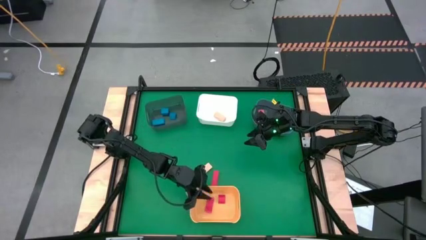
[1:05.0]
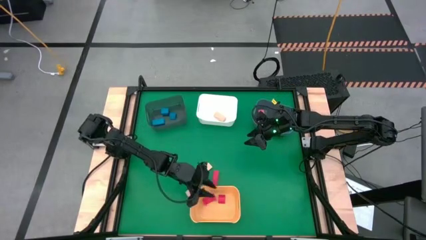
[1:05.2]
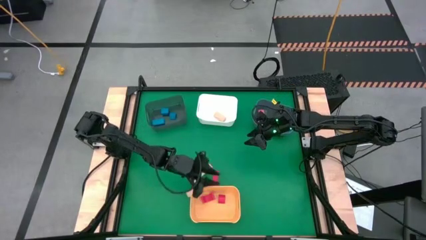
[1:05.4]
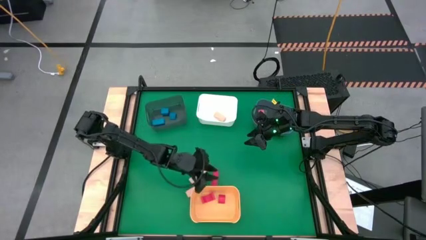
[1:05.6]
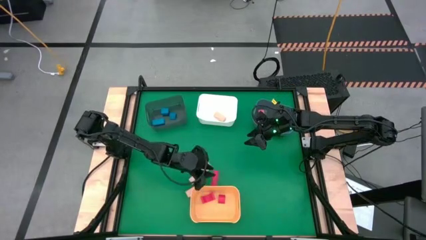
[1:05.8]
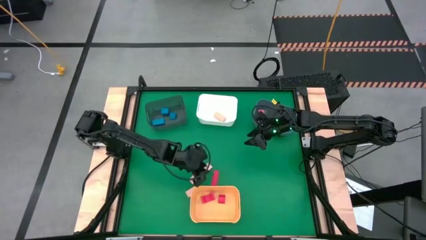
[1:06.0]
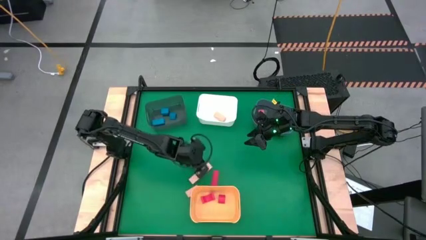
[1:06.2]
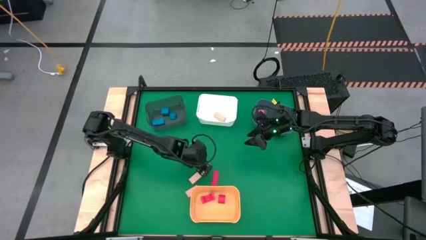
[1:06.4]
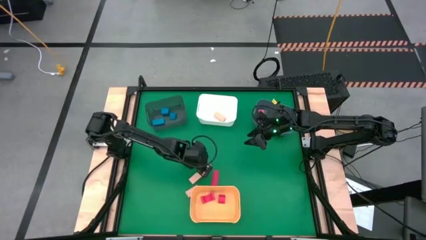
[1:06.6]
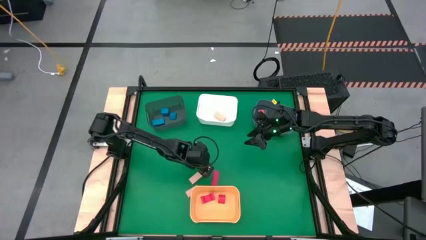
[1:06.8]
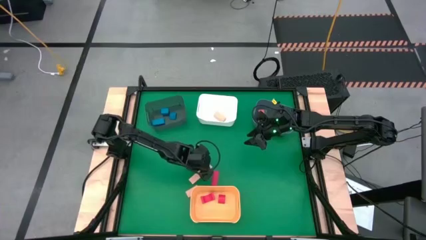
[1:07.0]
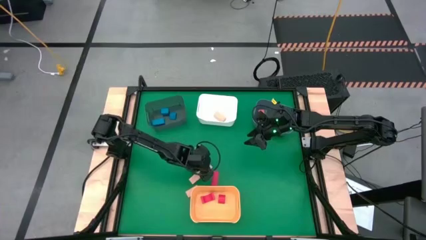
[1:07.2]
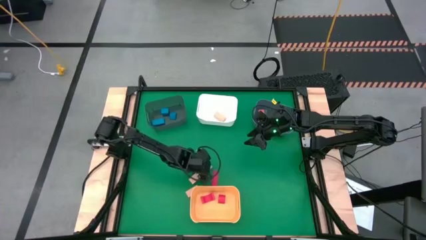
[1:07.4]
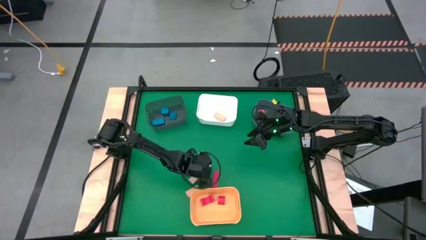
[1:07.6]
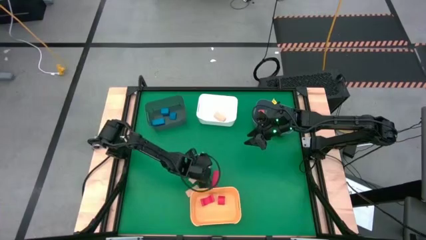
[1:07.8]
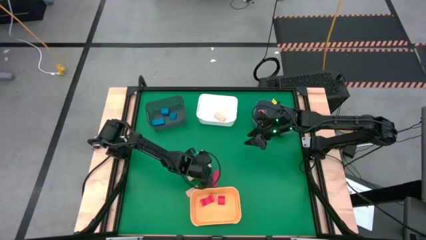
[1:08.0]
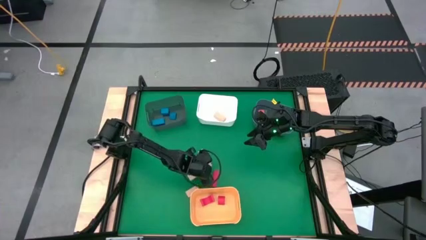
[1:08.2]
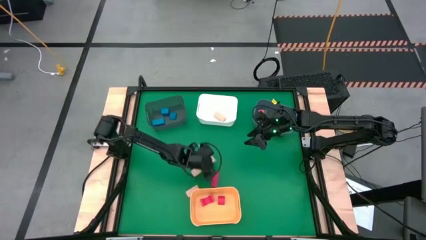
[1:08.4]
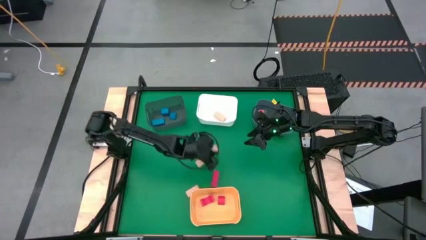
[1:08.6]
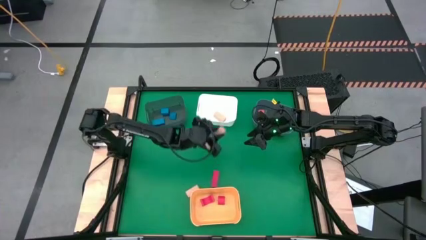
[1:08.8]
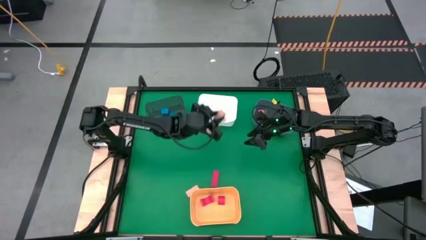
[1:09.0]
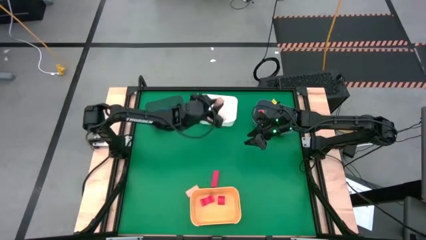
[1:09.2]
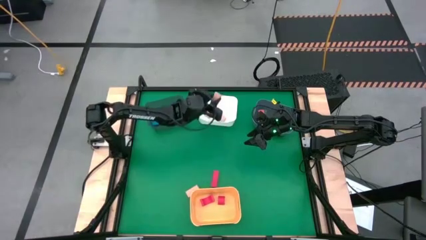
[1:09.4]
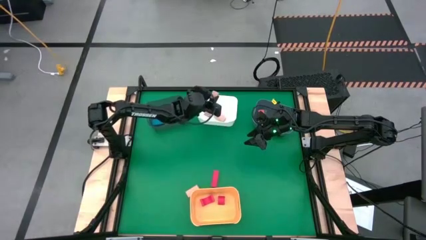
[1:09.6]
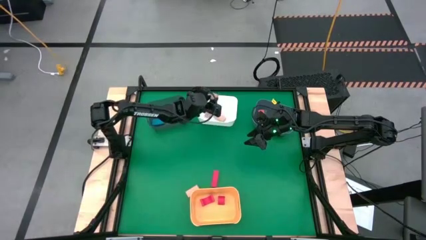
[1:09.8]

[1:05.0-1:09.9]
Task: Sort & place blocks by color
Put the wooden block into the white bin

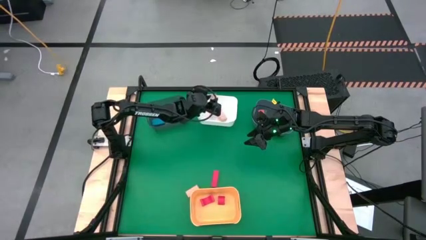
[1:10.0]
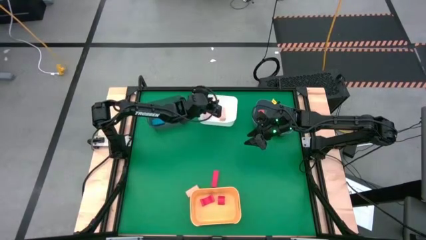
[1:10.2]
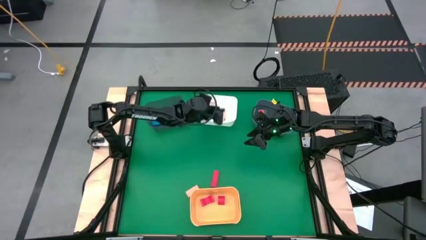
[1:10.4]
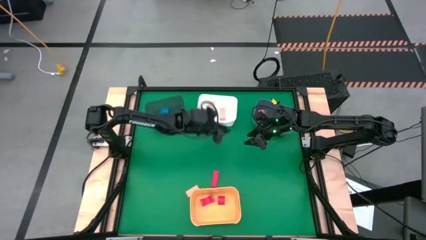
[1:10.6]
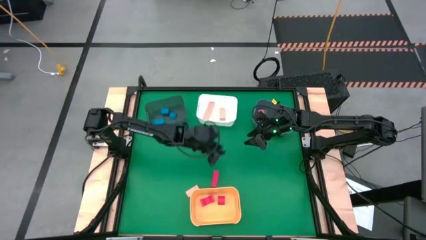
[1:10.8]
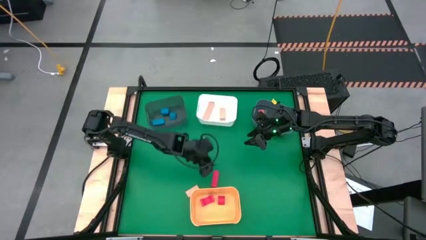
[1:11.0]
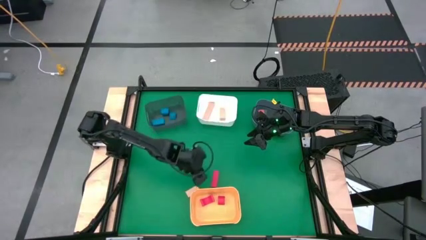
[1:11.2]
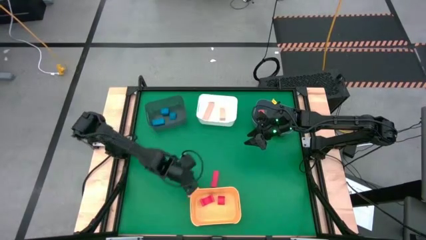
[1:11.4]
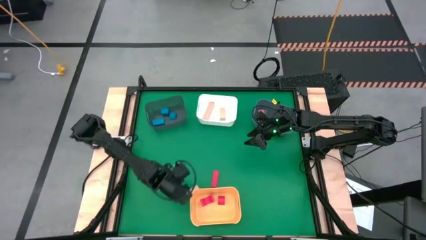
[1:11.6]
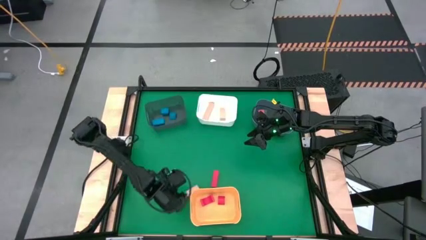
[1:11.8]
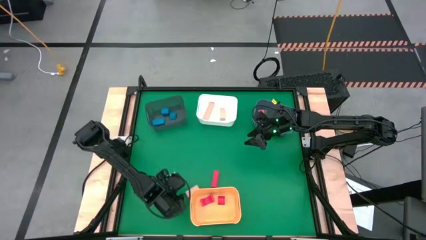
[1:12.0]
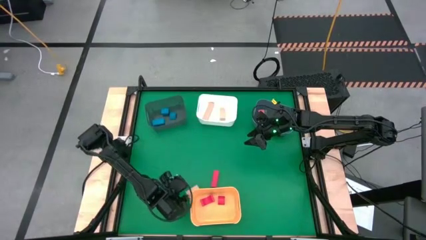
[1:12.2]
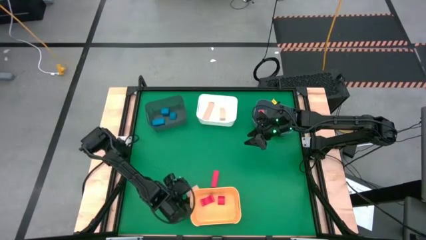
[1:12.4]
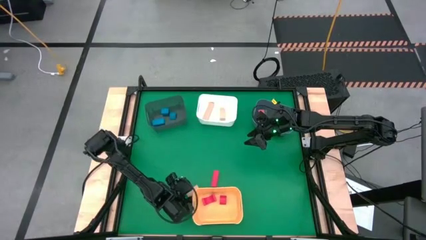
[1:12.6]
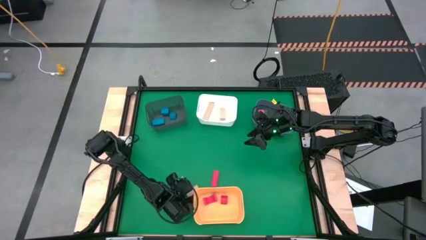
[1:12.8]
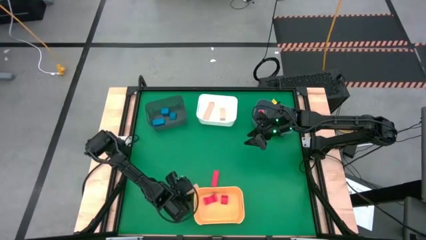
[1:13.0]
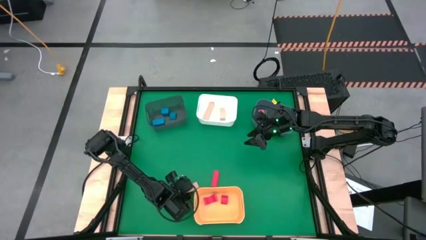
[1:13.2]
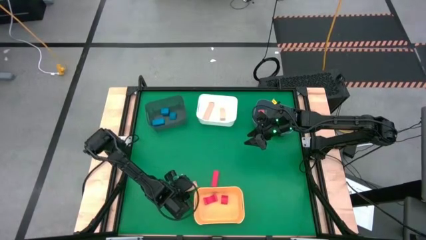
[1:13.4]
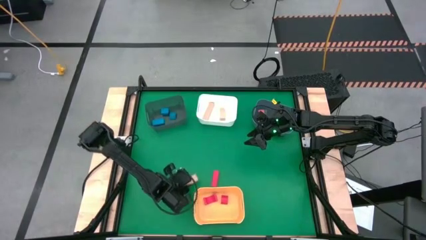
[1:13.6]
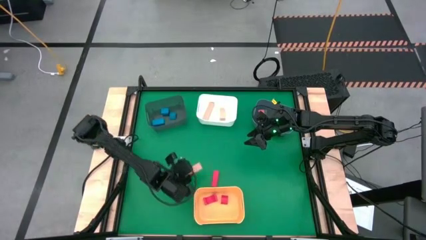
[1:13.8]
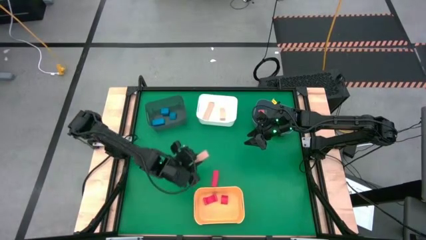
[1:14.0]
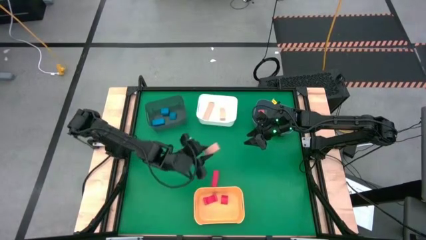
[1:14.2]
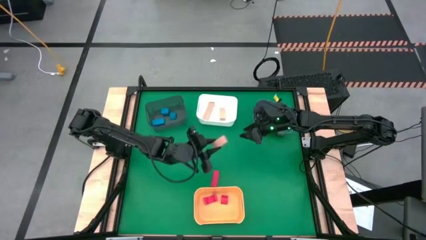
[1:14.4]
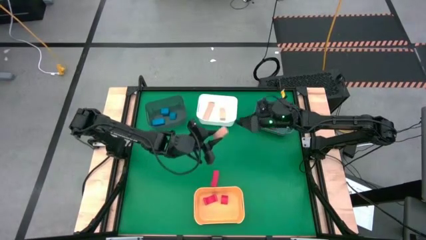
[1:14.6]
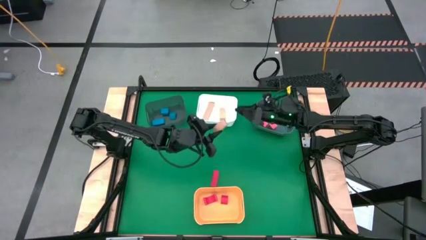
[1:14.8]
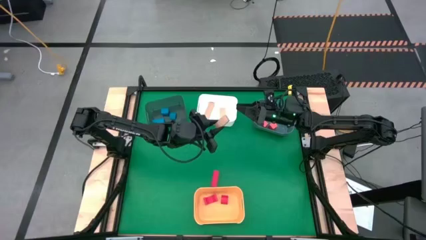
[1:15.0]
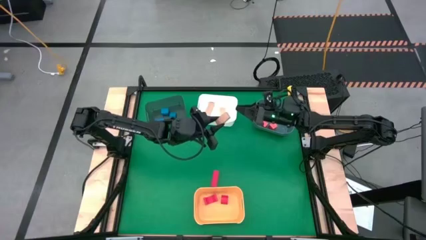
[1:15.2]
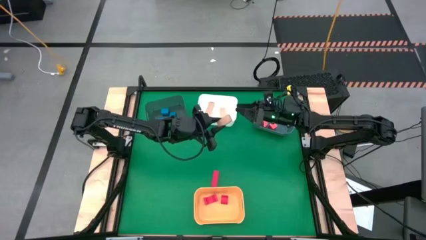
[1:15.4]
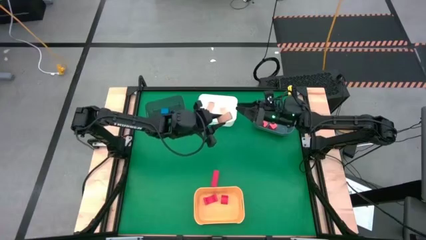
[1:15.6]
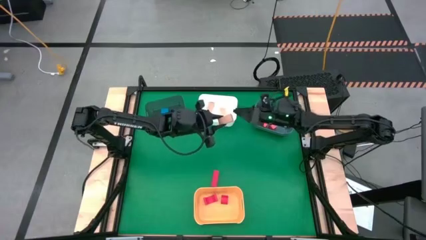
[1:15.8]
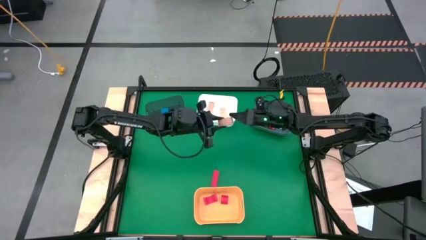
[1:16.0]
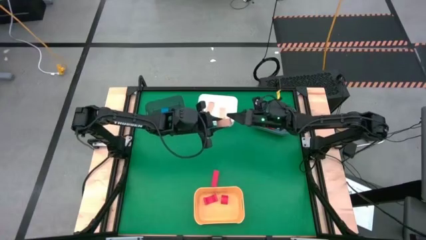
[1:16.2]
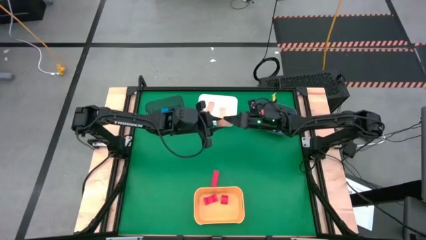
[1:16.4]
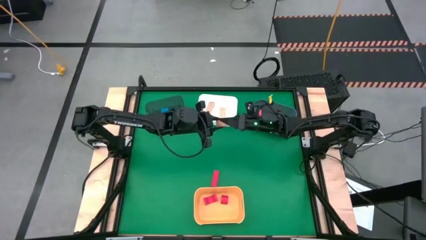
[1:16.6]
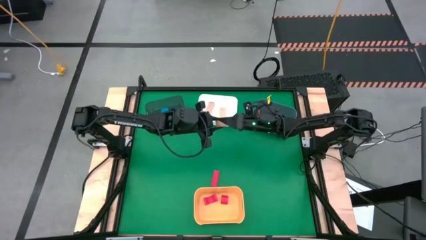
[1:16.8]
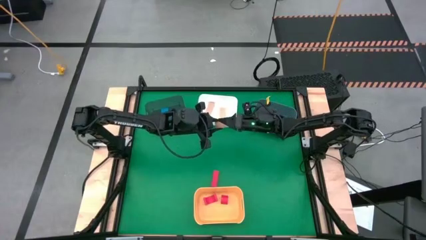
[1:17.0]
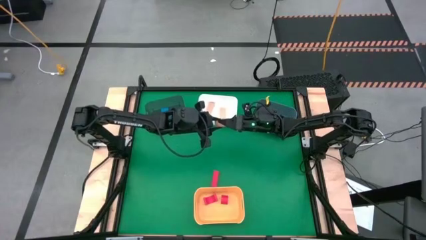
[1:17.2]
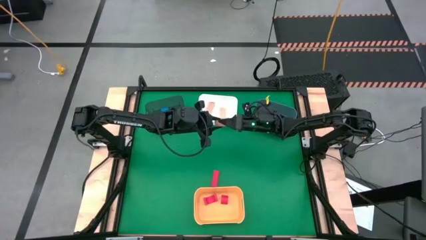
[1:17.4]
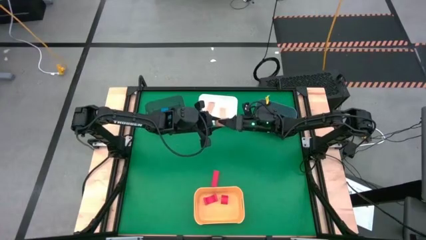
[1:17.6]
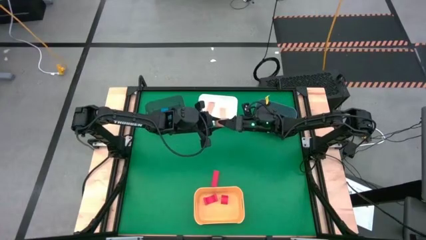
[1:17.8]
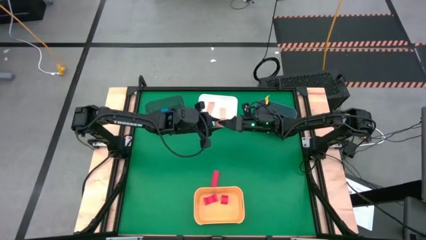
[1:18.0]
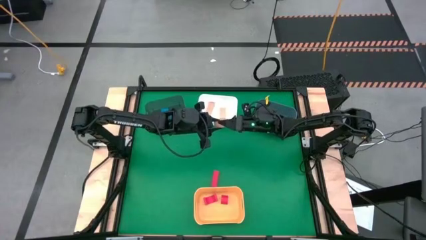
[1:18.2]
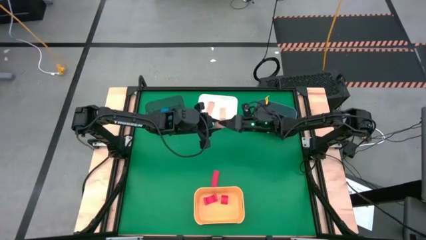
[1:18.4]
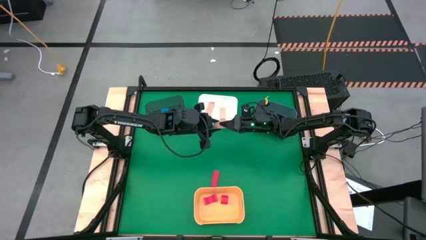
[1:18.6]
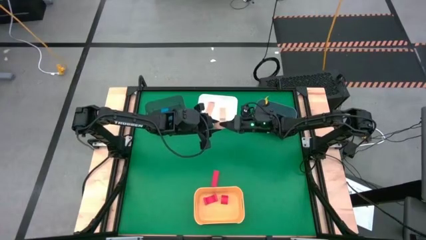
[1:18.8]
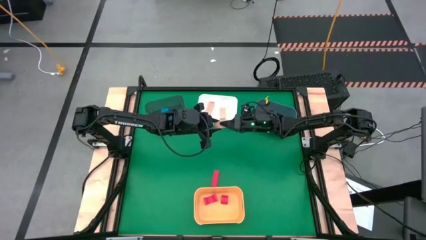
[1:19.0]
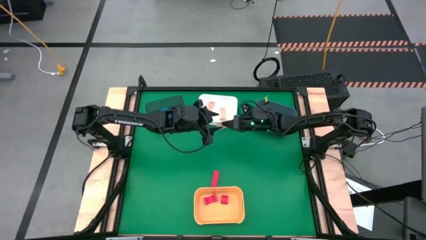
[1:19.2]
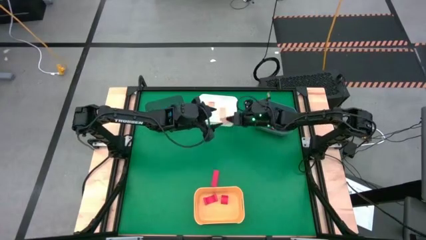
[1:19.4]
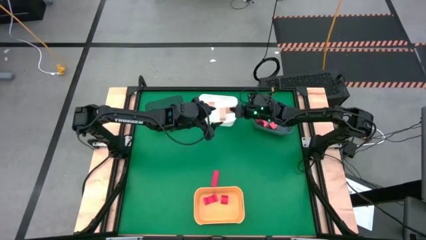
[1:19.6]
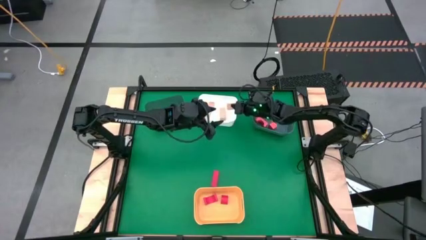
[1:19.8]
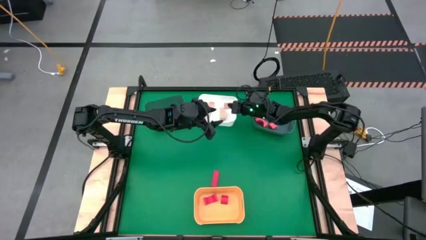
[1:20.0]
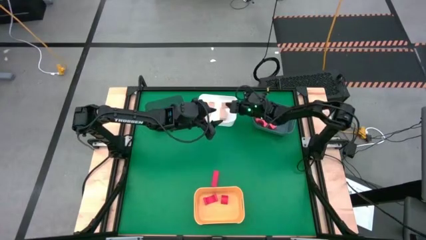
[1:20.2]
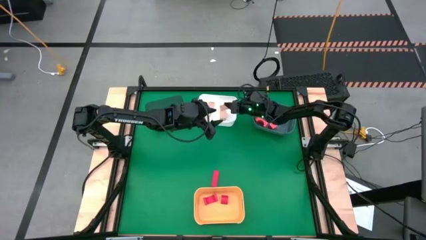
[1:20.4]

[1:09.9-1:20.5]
Put the wooden block into the white bin
